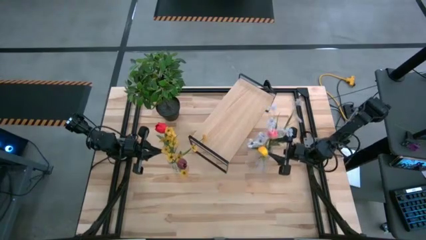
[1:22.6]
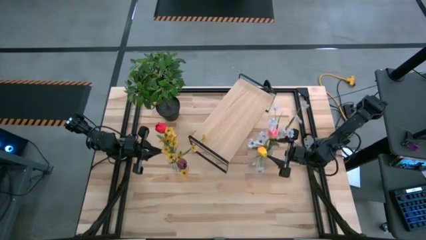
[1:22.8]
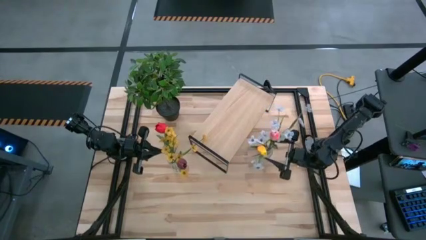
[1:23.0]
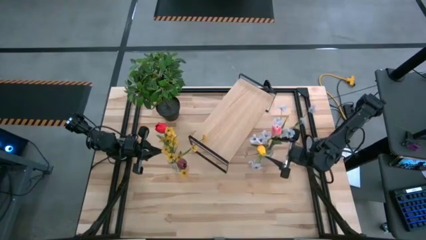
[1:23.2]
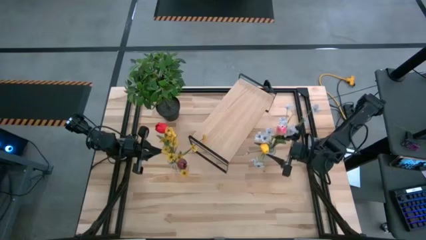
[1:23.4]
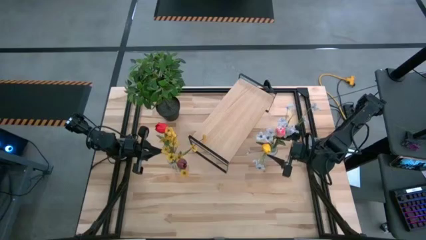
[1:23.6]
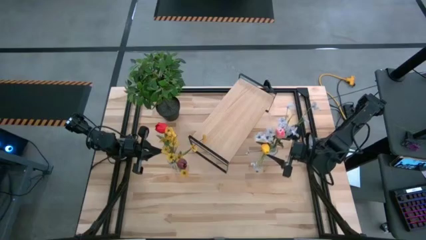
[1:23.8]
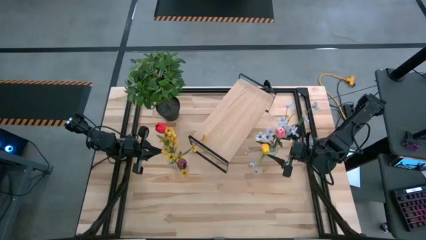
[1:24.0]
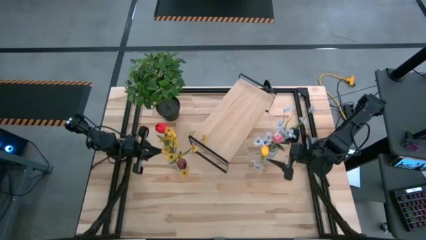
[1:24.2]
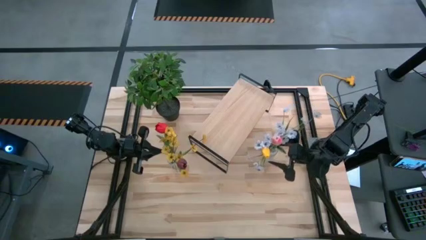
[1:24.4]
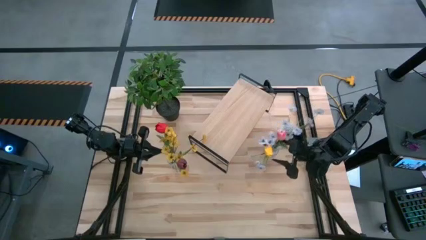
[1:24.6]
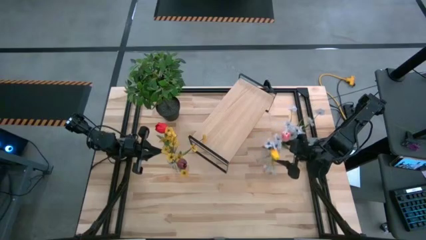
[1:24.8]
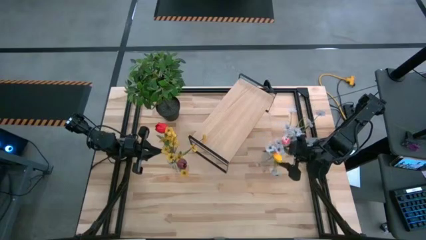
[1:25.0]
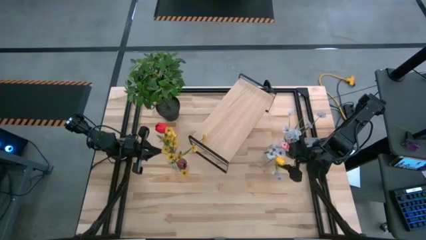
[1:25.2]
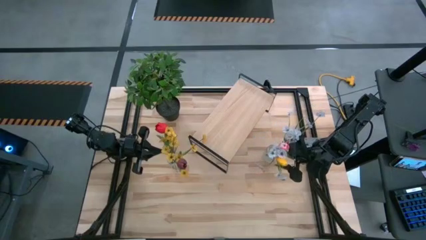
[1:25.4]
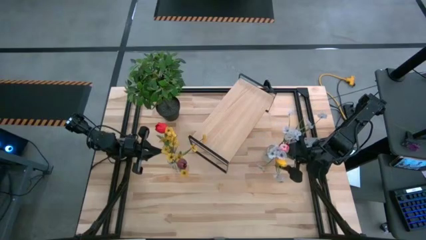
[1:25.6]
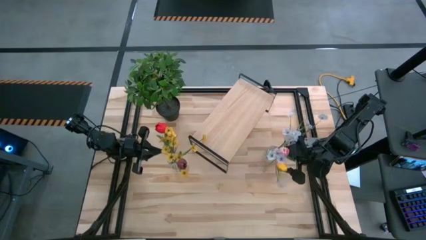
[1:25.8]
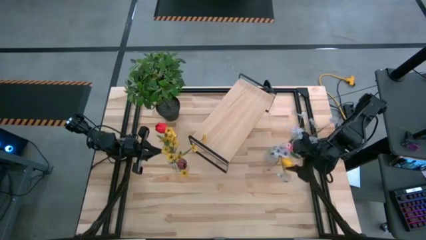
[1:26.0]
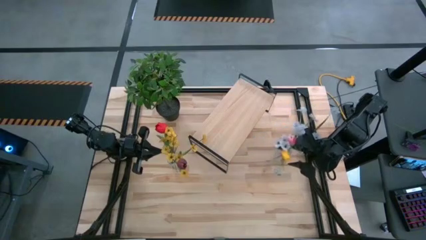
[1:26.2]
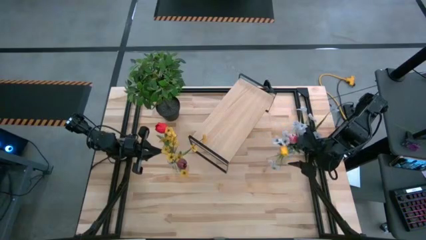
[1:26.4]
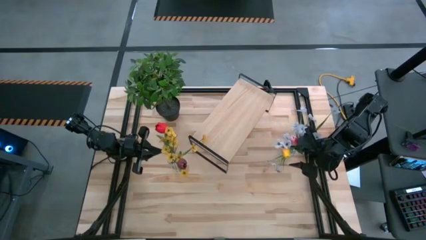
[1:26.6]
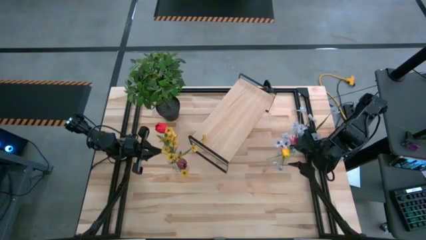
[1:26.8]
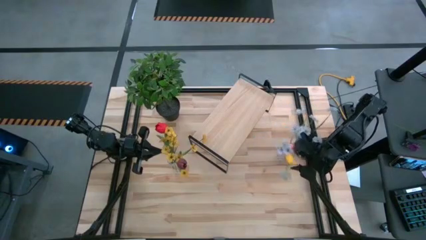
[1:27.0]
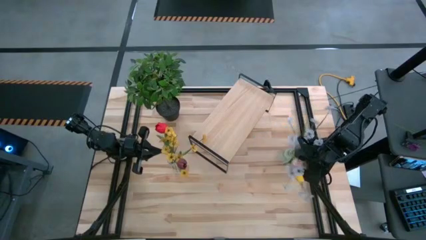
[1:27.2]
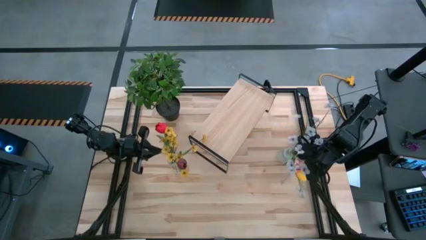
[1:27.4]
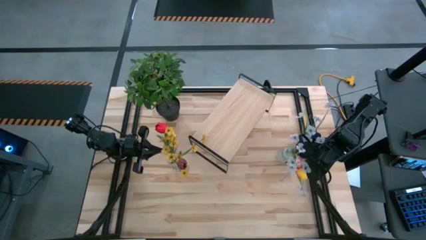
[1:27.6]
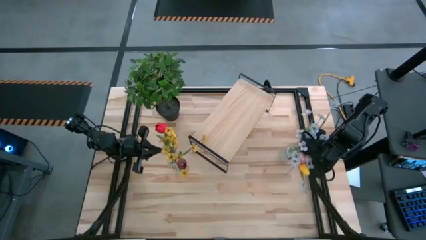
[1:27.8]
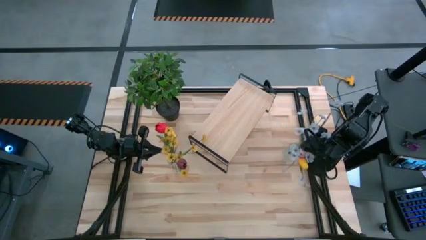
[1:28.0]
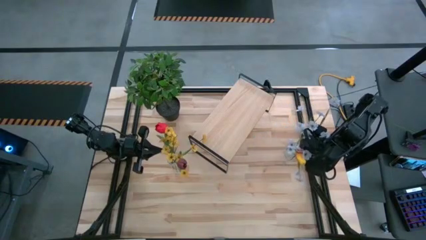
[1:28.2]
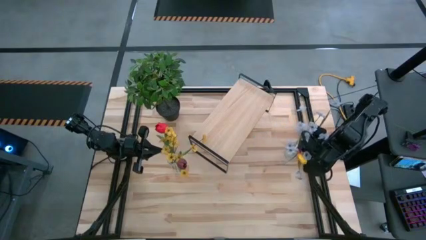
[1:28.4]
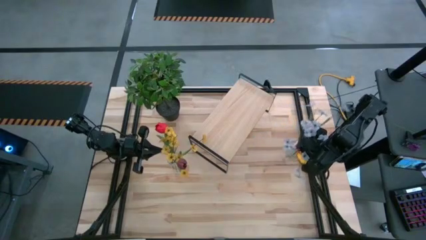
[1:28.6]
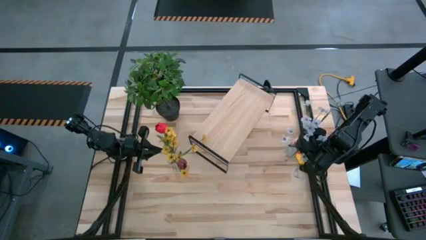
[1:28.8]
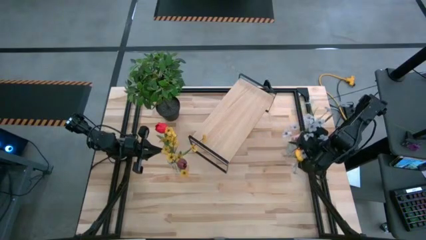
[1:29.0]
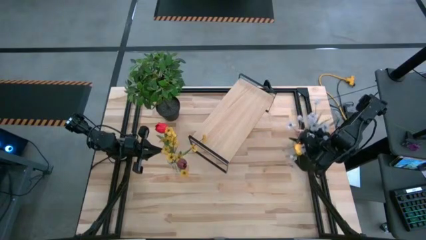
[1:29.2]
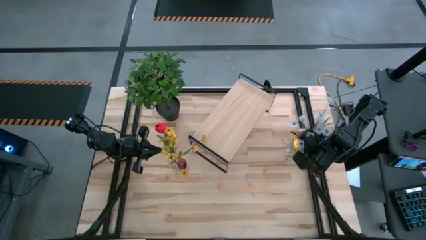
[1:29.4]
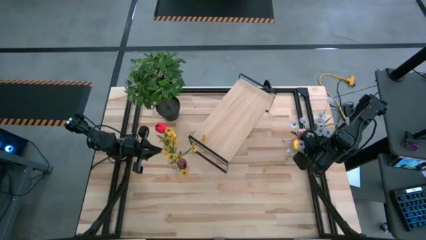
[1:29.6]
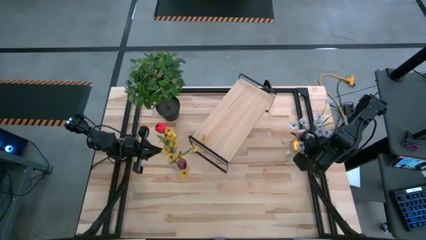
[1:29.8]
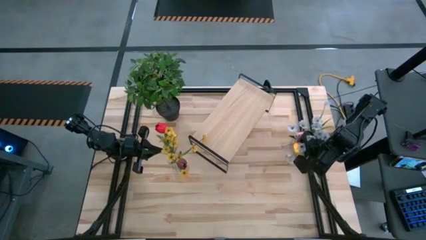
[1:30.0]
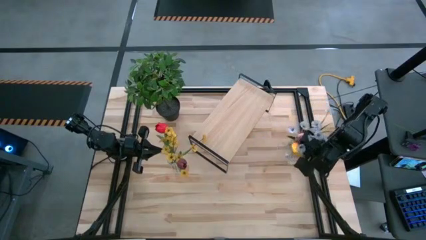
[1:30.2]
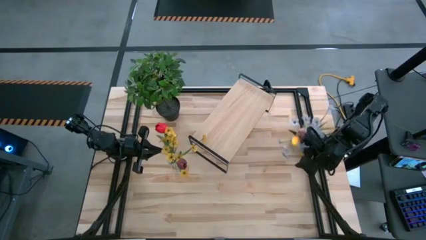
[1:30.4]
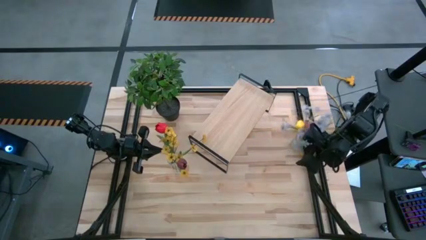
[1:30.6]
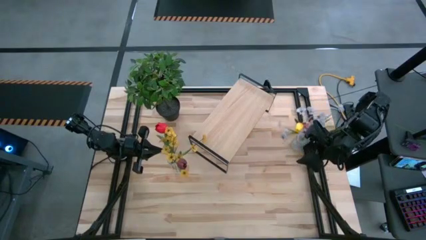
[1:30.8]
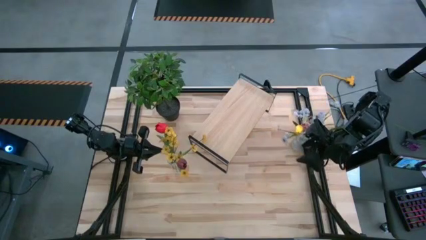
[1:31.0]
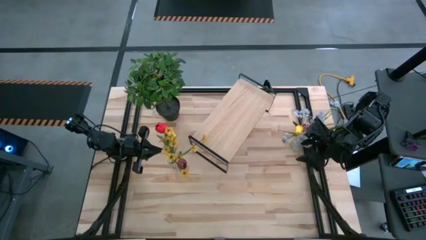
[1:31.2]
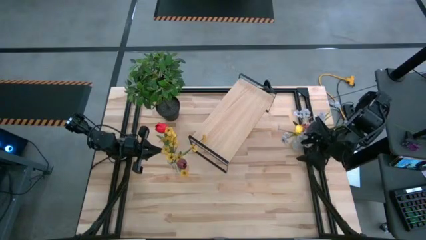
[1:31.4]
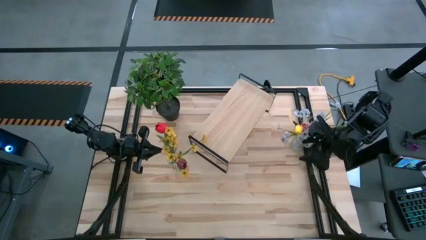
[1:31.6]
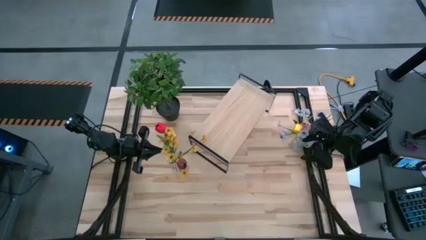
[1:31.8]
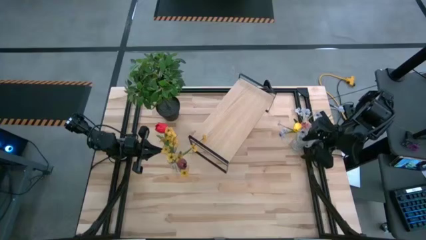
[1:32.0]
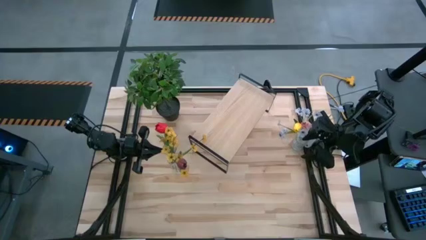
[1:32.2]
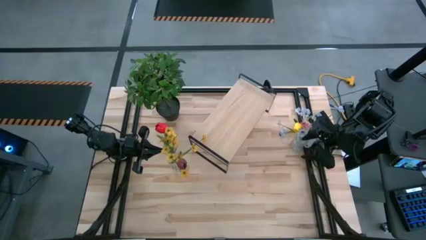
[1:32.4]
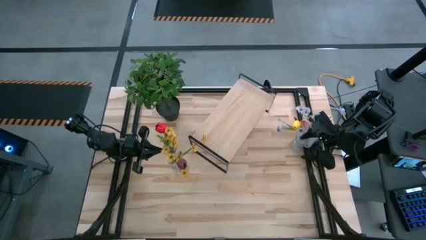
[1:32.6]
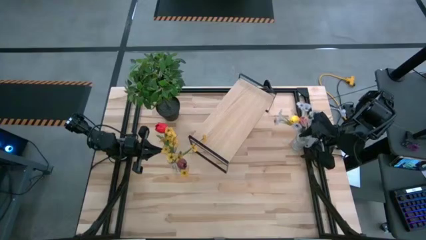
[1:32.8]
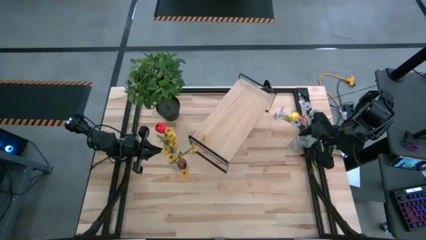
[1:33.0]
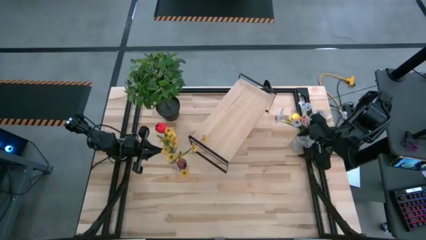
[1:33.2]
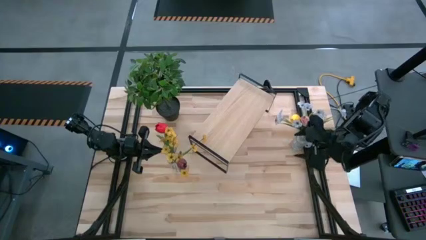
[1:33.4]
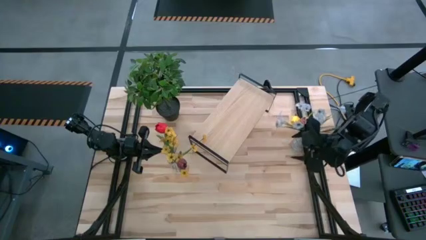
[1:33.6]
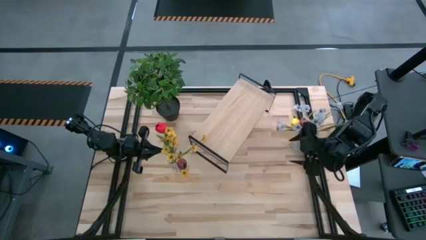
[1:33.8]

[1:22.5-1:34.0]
Task: Pick and place flowers into a vace then onto a shelf
Put the right flower vase on the shelf
